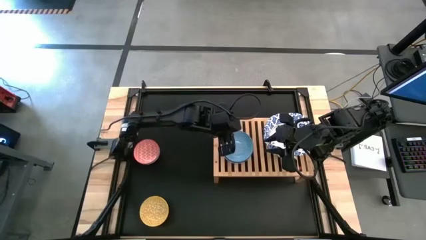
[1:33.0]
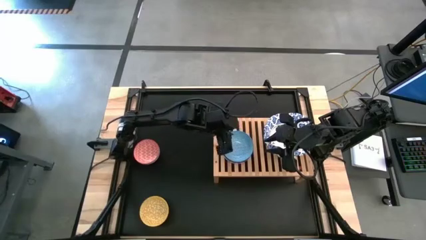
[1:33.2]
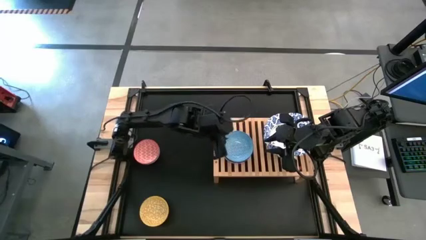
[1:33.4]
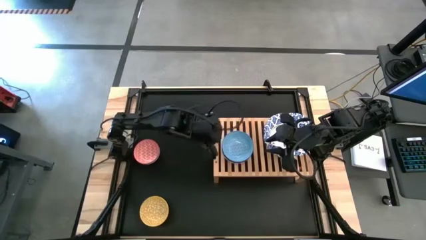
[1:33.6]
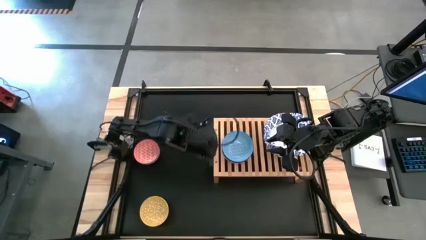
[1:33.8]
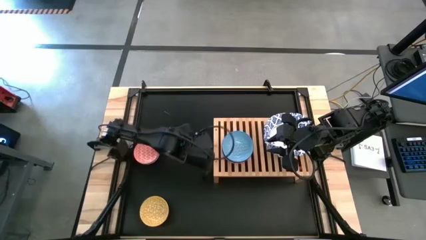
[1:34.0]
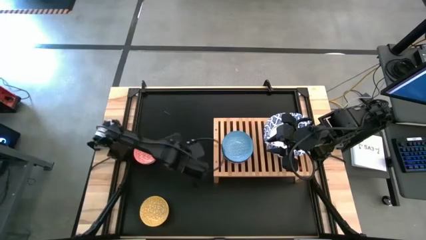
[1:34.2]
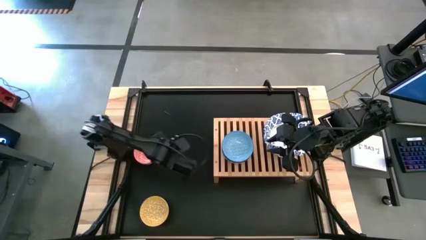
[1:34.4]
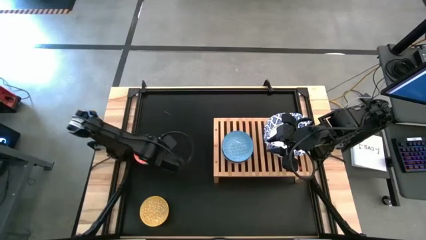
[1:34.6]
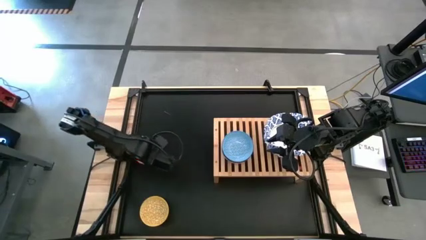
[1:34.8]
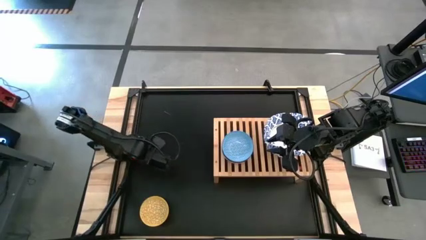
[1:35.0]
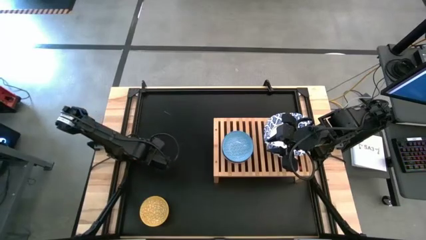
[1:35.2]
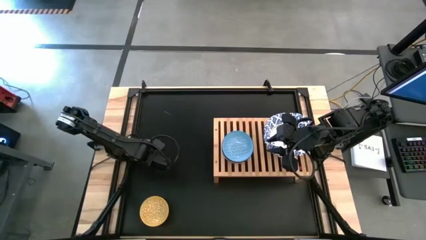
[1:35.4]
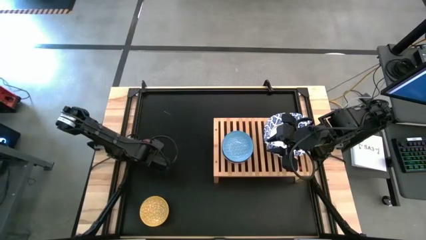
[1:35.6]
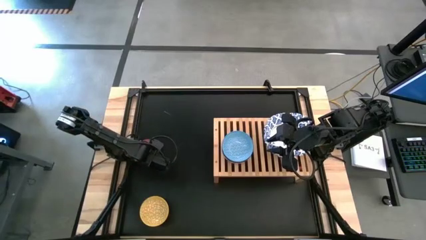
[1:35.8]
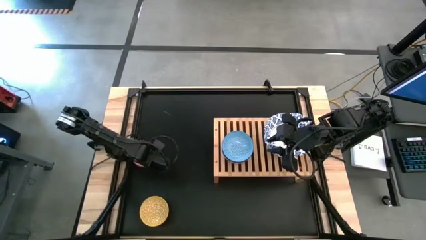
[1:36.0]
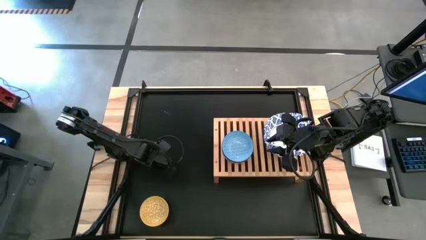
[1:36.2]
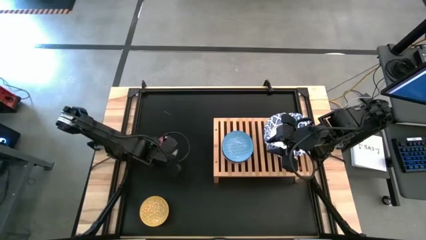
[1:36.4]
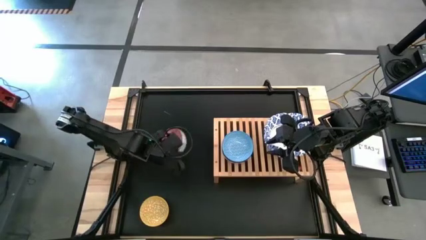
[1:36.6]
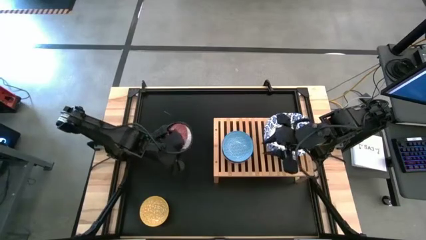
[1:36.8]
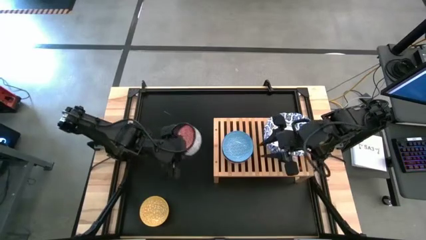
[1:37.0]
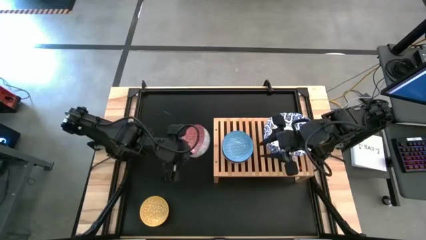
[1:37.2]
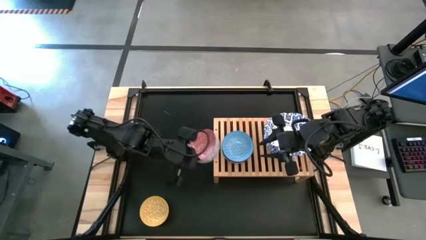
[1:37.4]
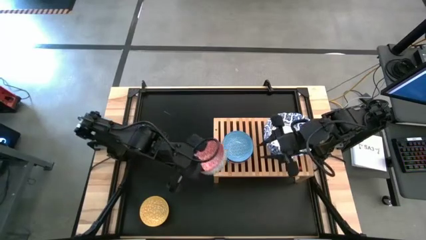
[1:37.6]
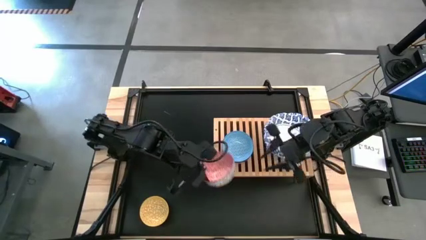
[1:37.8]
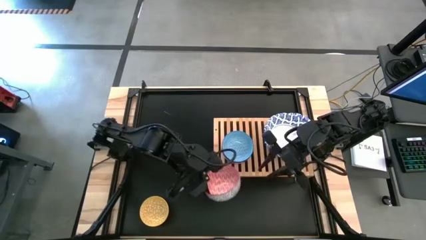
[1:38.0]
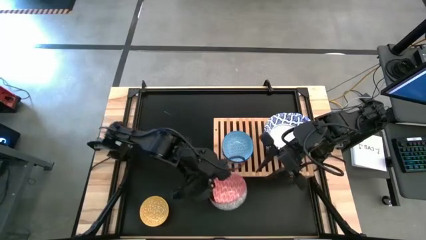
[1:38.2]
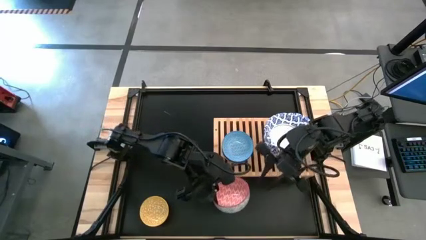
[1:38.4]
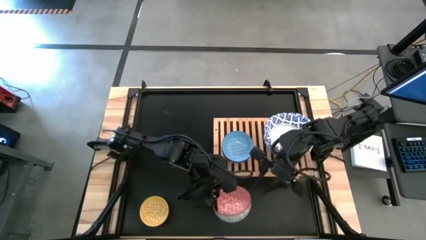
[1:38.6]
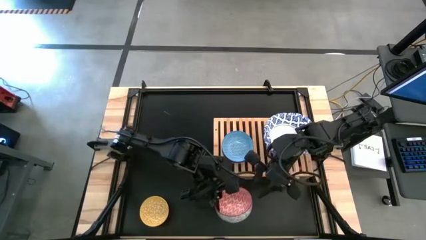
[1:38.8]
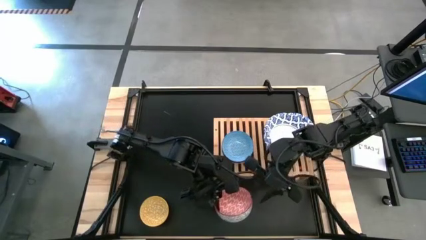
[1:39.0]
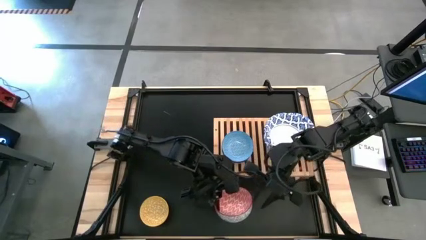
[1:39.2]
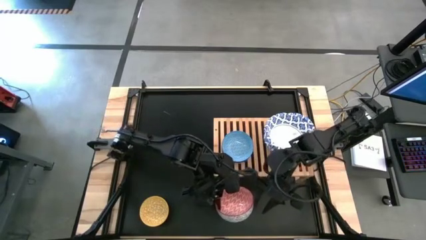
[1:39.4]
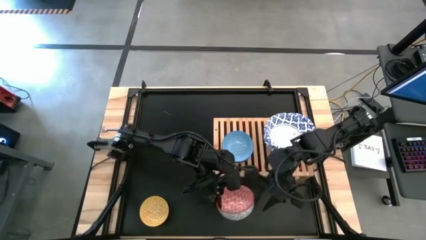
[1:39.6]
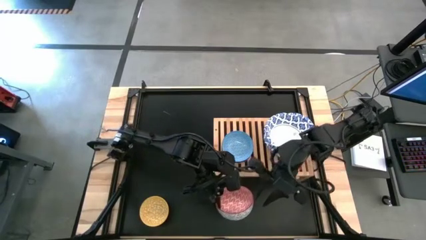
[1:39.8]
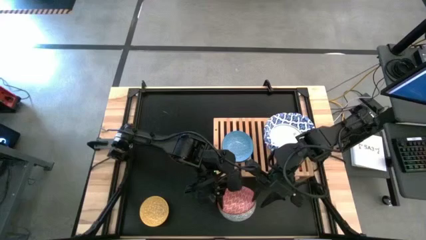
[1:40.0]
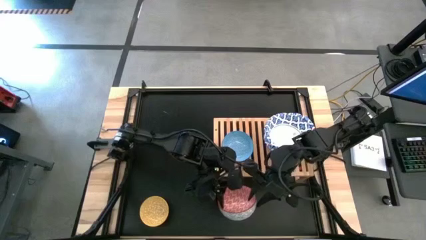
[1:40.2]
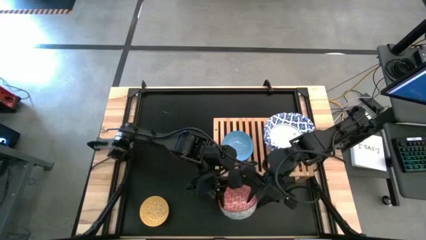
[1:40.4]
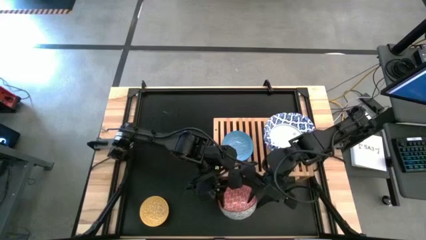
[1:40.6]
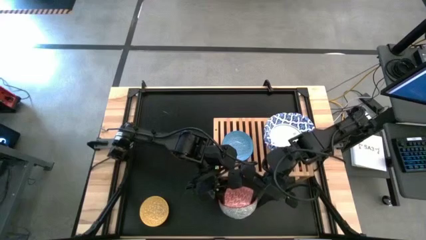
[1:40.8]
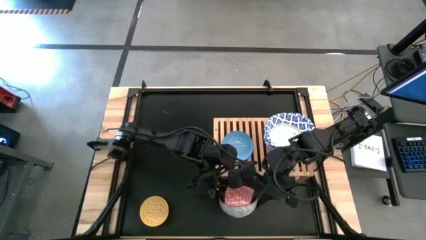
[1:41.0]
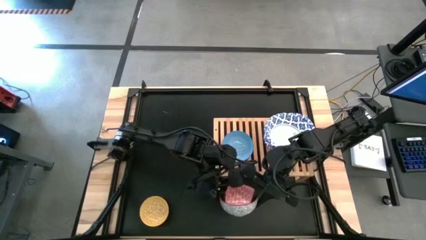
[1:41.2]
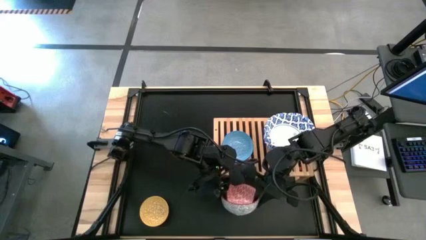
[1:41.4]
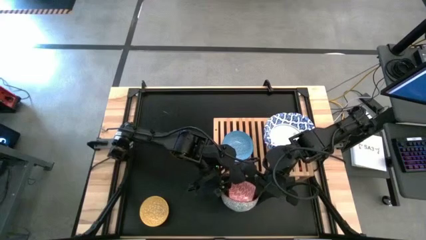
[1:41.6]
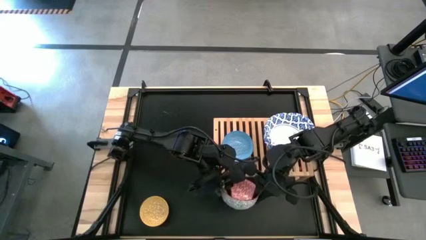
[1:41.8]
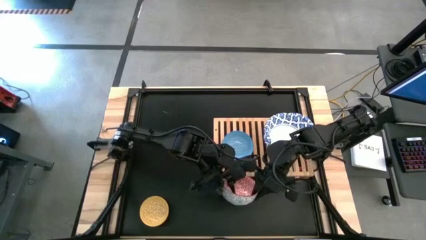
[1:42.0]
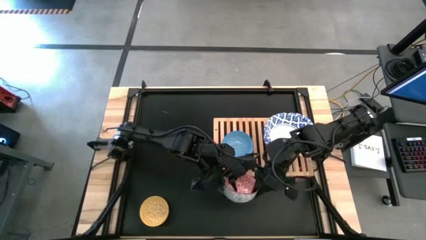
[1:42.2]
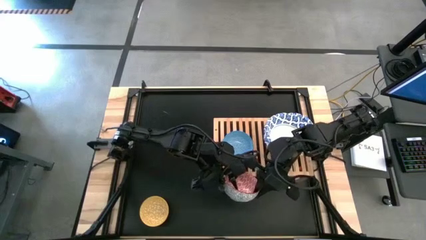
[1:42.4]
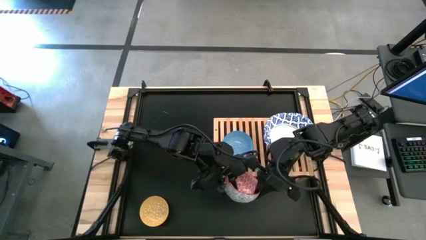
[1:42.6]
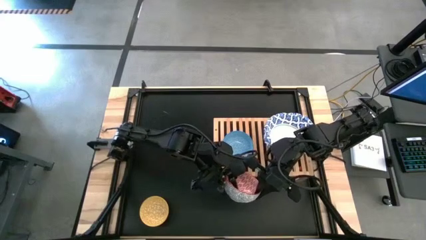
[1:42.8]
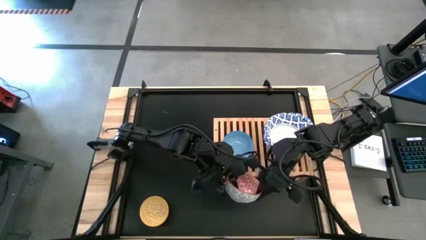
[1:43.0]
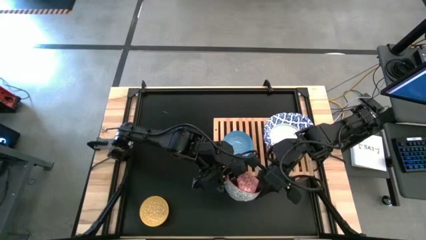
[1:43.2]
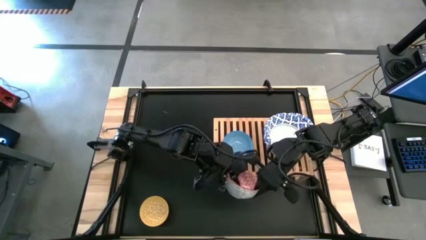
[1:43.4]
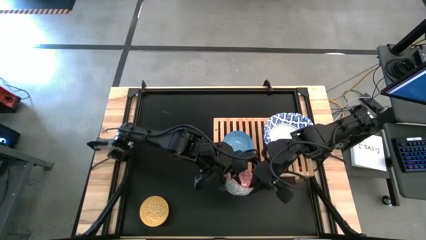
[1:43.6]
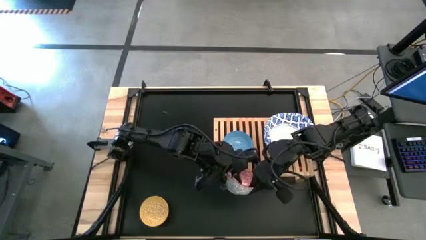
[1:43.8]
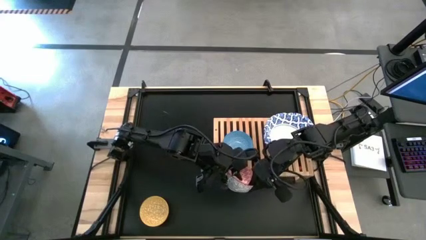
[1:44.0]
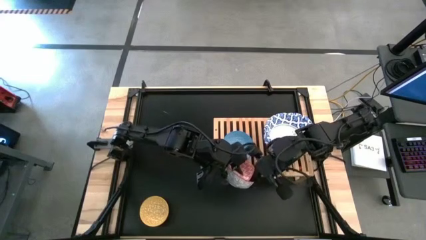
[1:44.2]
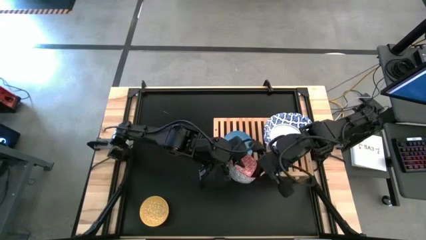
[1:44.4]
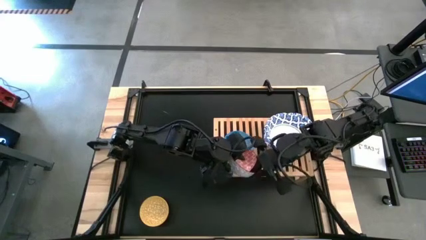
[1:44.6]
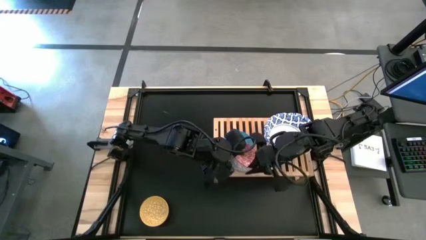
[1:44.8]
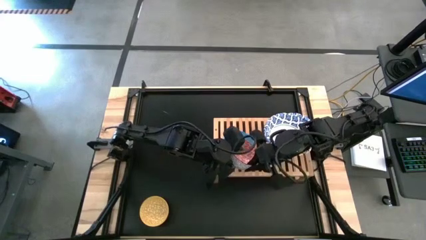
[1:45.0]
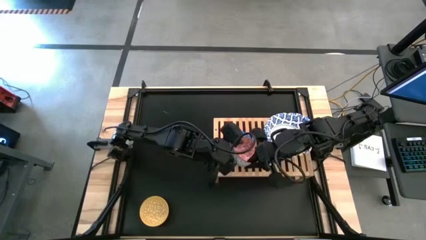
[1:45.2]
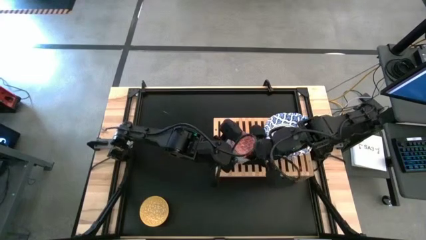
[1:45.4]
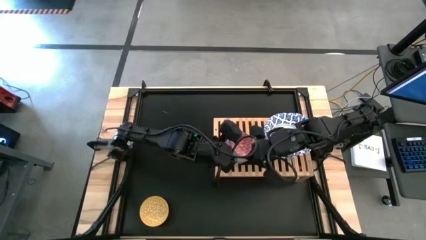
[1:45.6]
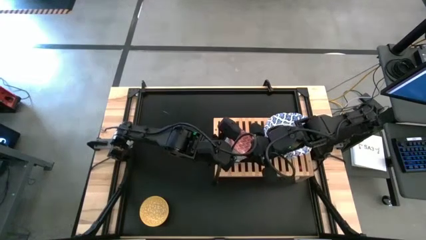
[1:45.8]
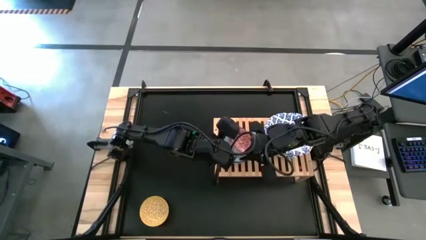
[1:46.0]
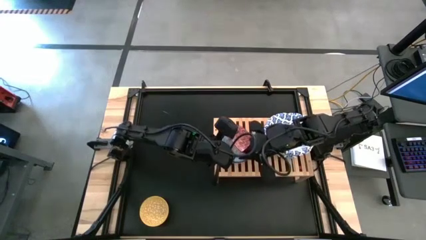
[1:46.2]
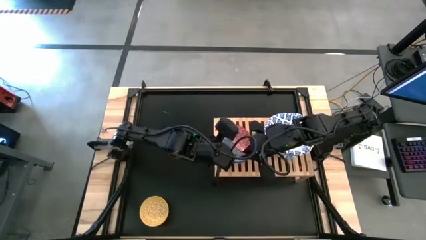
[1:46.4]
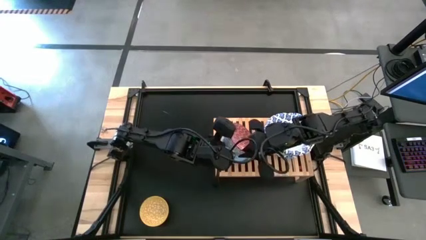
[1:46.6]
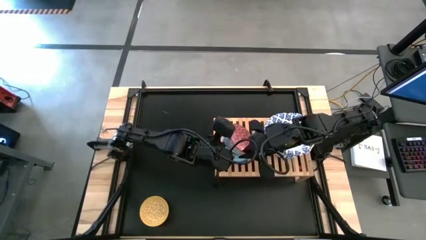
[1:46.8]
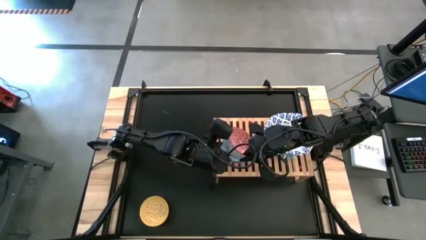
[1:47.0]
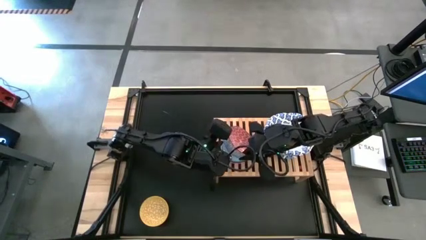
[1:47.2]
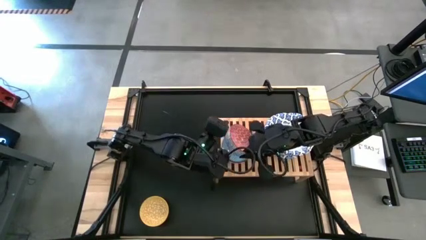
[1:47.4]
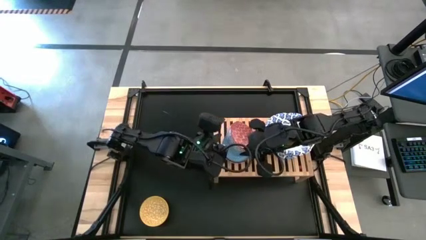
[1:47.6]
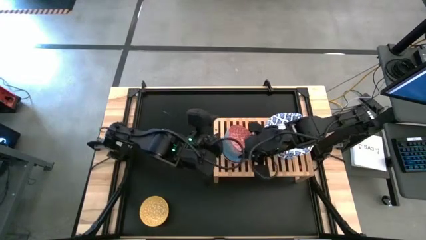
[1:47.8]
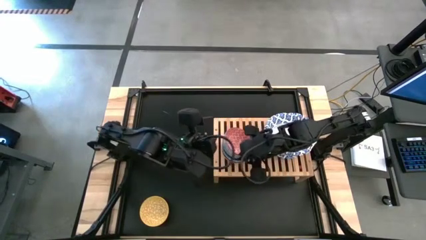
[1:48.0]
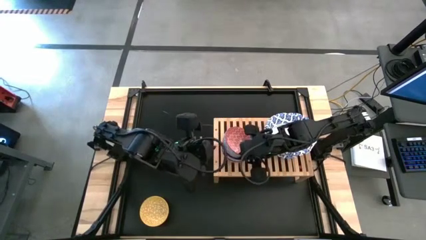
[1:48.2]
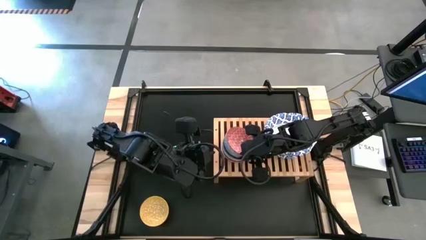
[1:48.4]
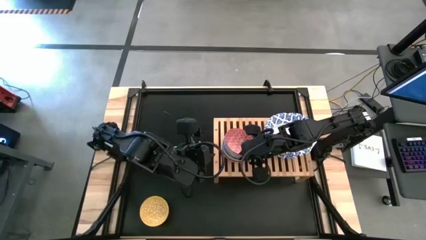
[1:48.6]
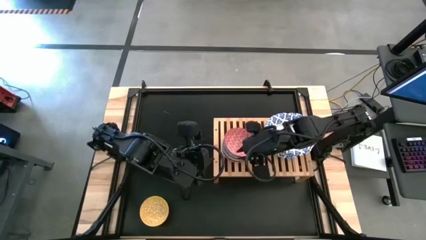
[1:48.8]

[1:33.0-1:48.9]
Task: Place and stack bowls onto a shelf
Stack the small gray and orange bowl on top of the small yellow and blue bowl

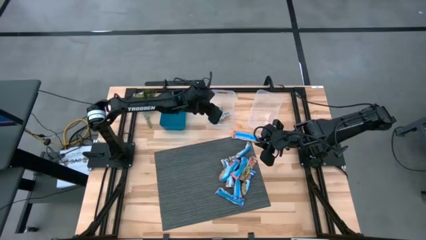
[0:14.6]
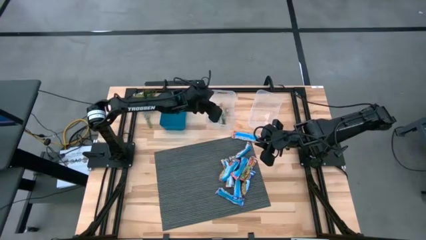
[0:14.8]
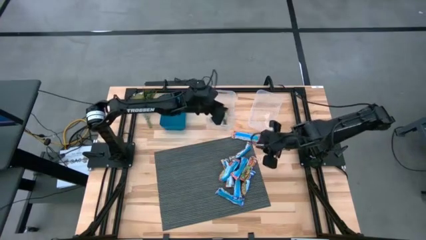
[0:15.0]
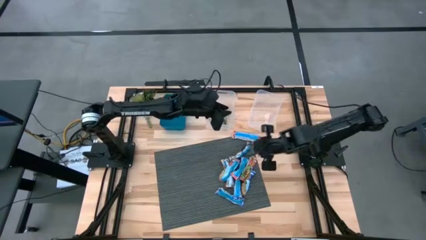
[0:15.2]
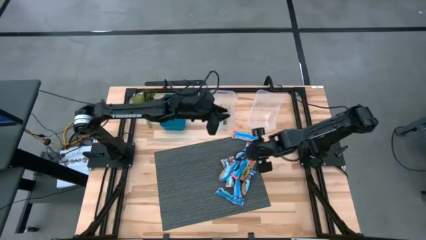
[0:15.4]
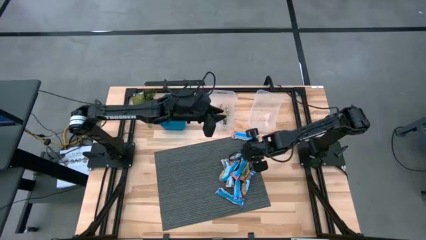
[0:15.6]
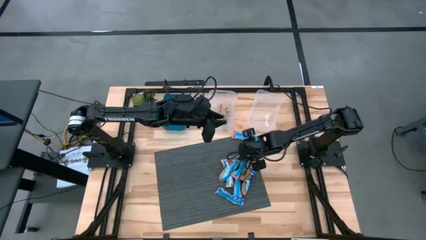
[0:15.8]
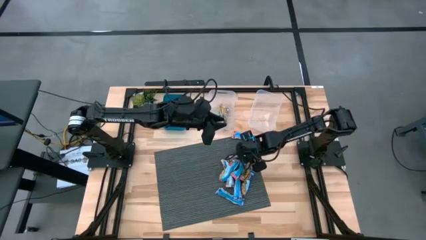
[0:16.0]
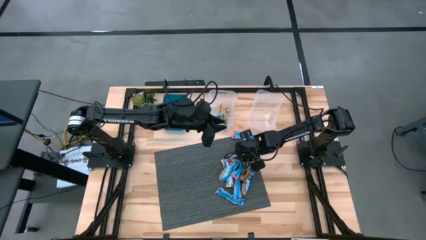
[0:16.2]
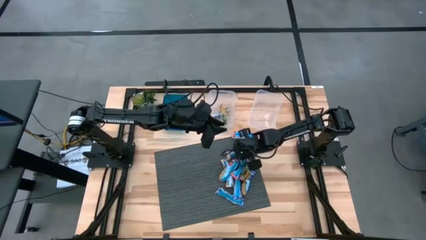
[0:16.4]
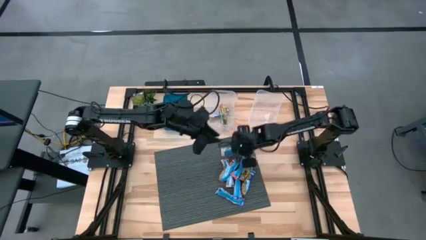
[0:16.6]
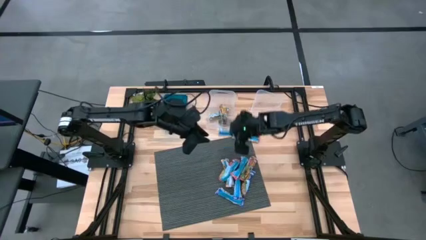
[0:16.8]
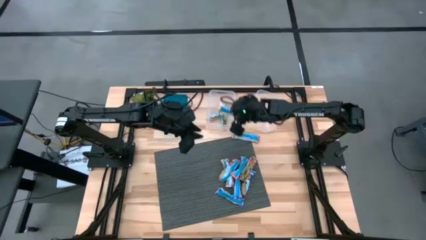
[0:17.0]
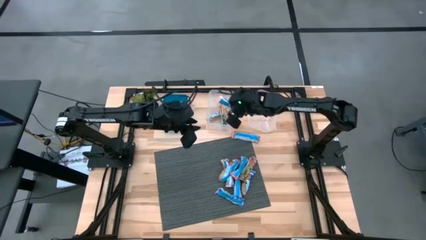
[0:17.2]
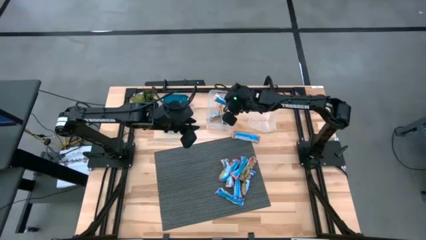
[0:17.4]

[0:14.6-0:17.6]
Task: Pick and place Granola Bars by type
Put the yellow granola bar into the left transparent bin
